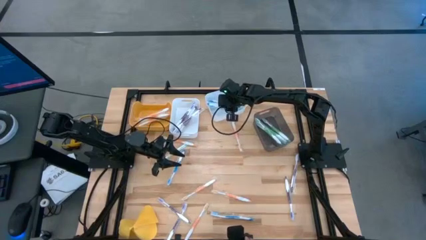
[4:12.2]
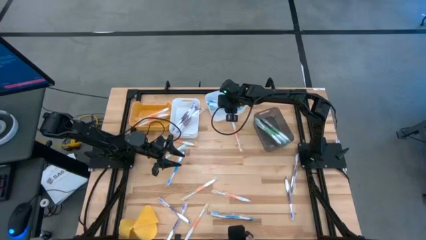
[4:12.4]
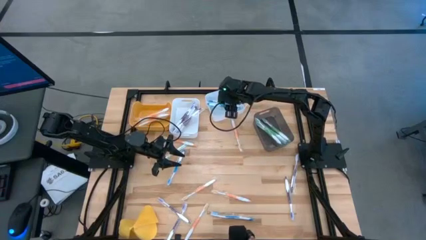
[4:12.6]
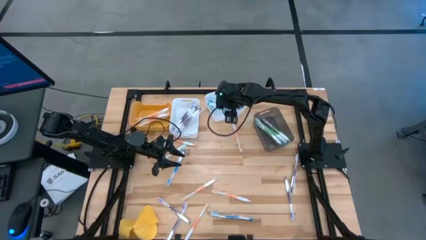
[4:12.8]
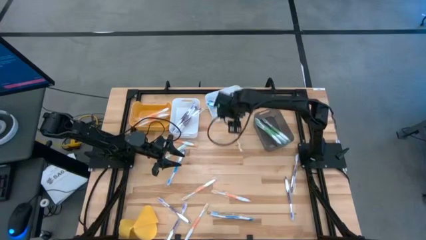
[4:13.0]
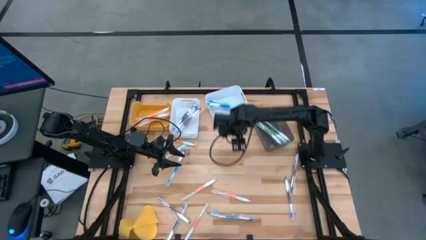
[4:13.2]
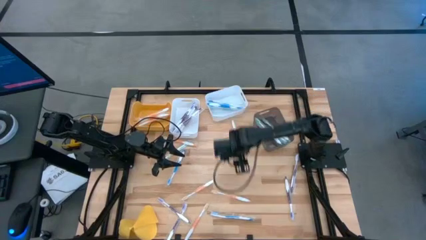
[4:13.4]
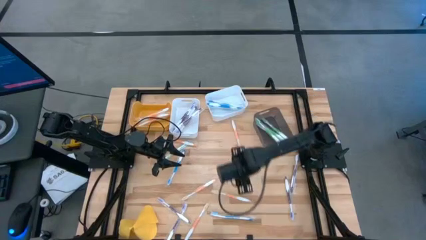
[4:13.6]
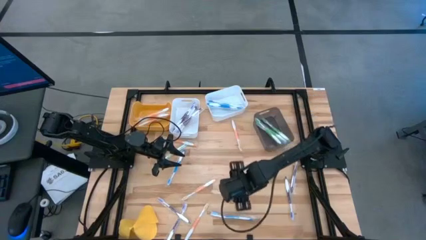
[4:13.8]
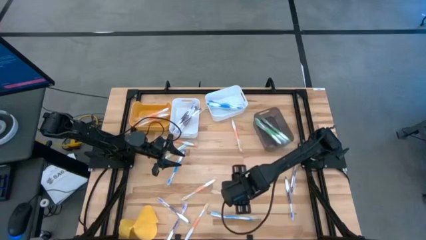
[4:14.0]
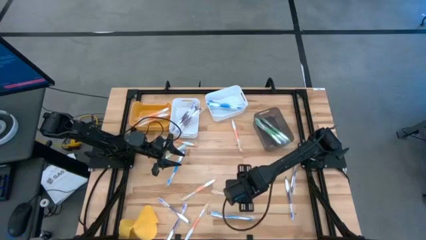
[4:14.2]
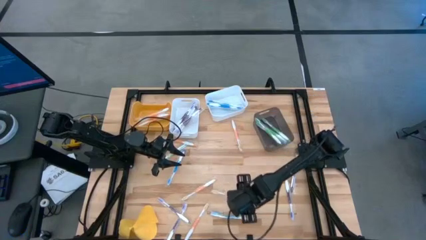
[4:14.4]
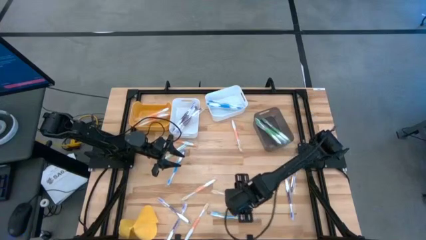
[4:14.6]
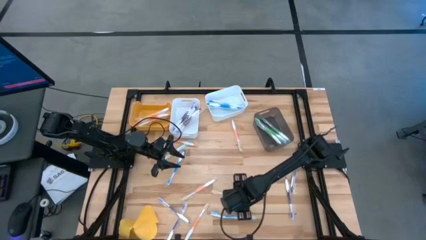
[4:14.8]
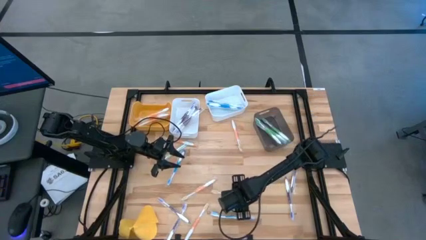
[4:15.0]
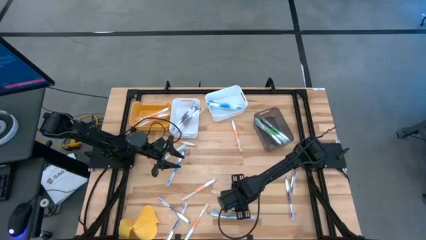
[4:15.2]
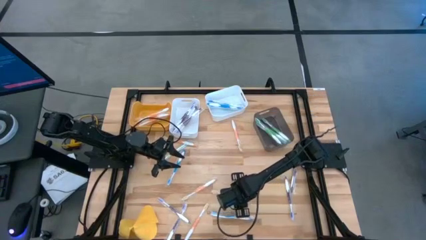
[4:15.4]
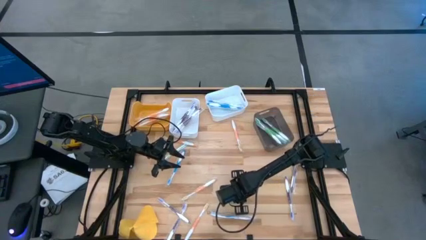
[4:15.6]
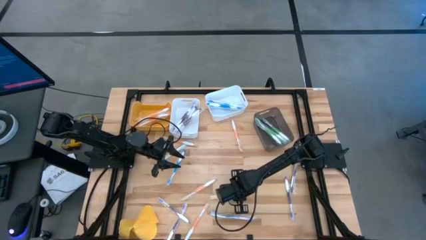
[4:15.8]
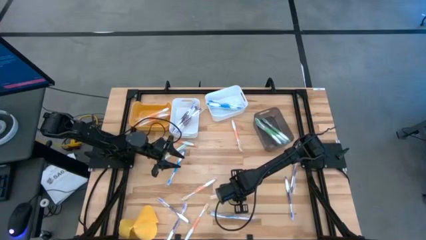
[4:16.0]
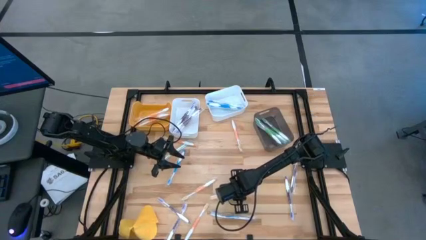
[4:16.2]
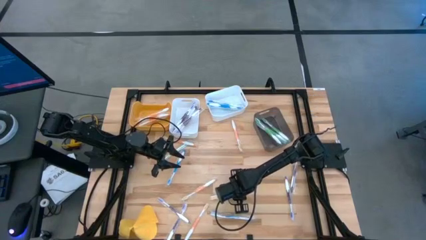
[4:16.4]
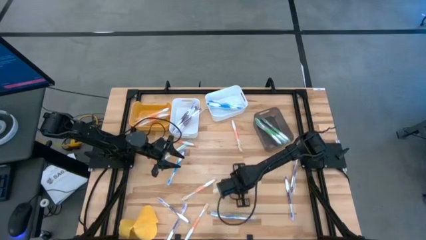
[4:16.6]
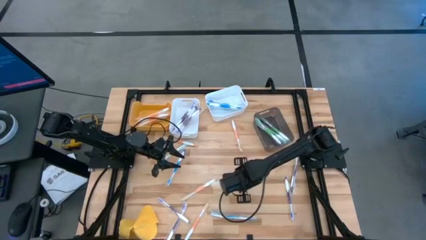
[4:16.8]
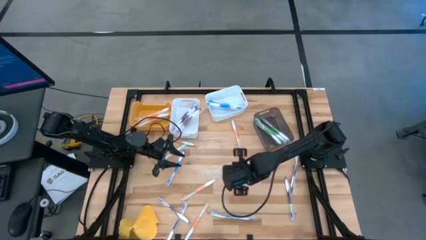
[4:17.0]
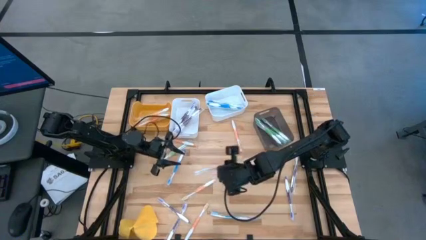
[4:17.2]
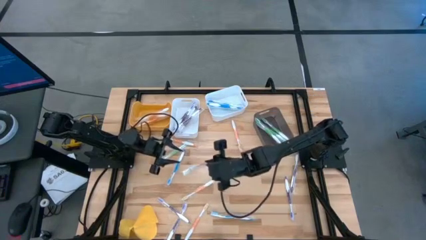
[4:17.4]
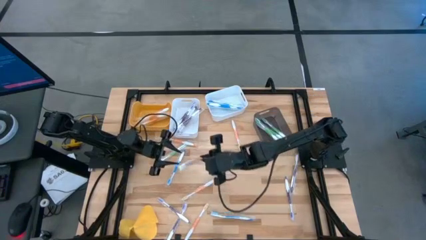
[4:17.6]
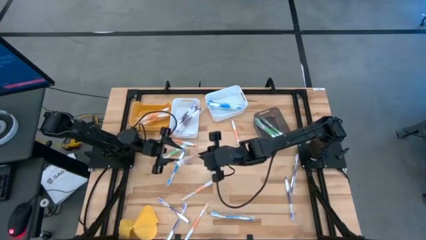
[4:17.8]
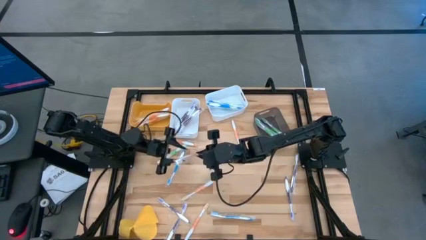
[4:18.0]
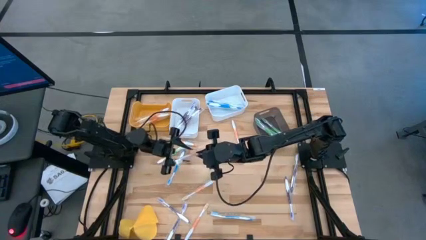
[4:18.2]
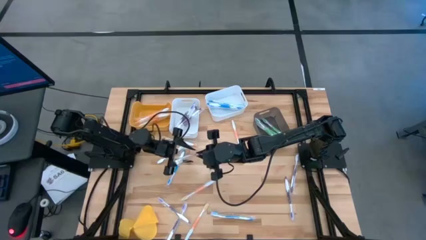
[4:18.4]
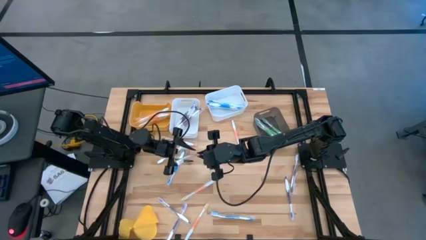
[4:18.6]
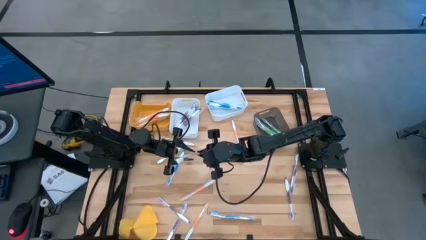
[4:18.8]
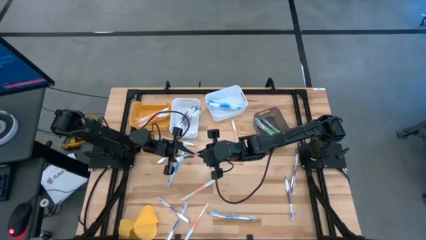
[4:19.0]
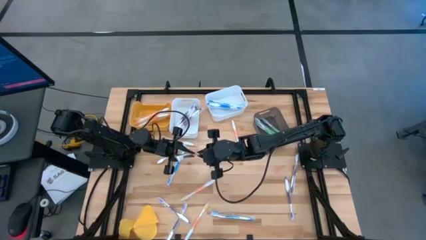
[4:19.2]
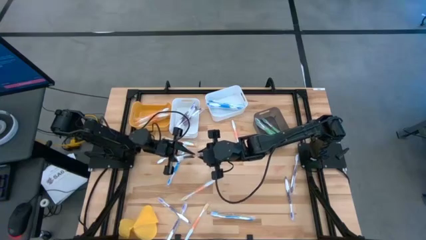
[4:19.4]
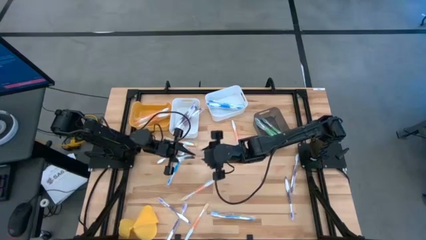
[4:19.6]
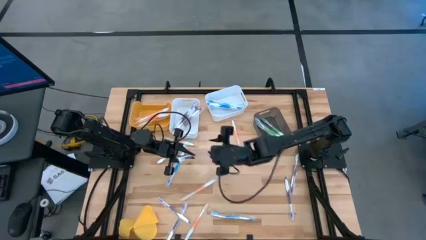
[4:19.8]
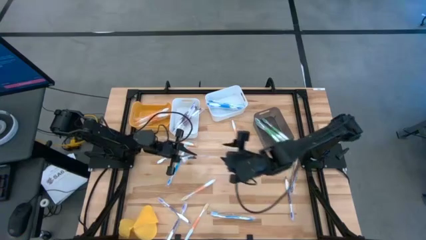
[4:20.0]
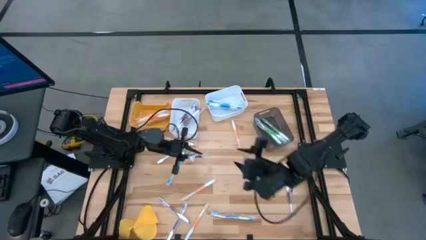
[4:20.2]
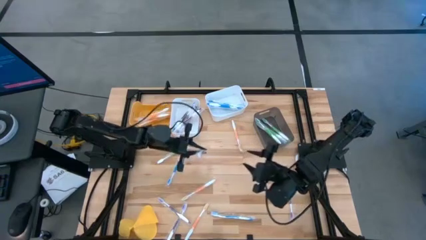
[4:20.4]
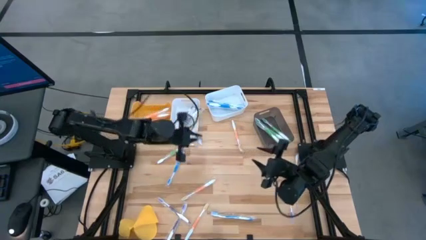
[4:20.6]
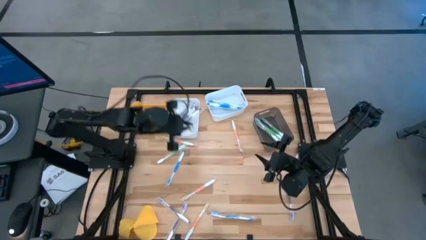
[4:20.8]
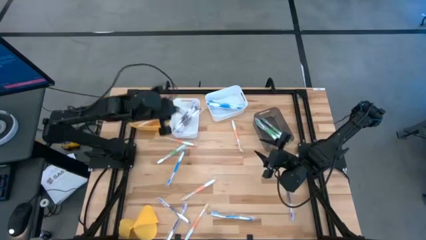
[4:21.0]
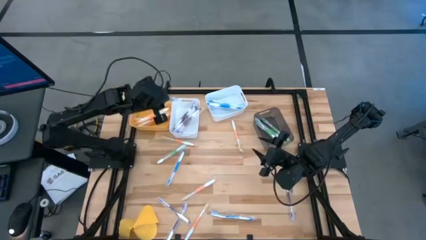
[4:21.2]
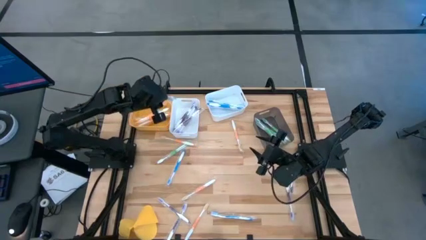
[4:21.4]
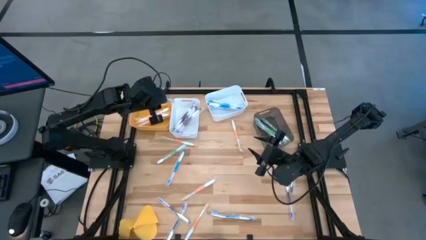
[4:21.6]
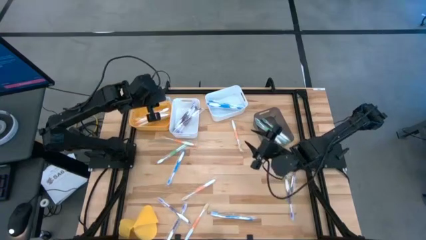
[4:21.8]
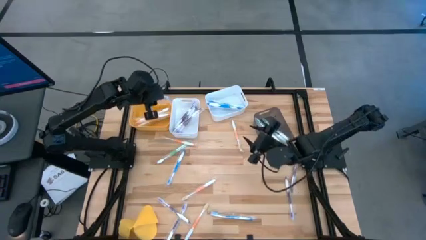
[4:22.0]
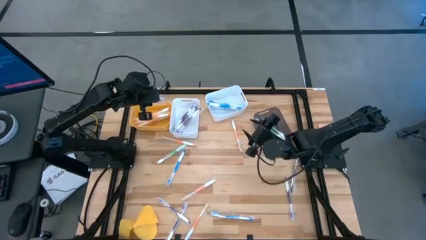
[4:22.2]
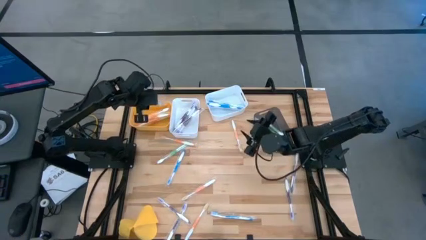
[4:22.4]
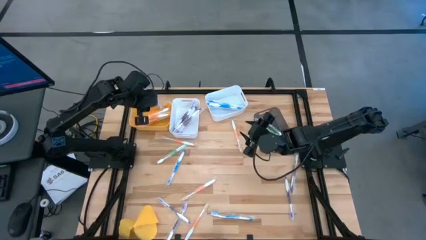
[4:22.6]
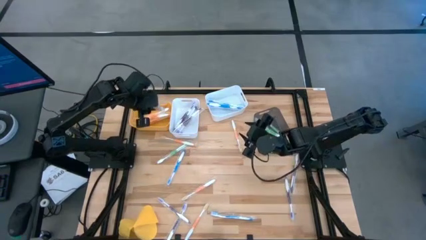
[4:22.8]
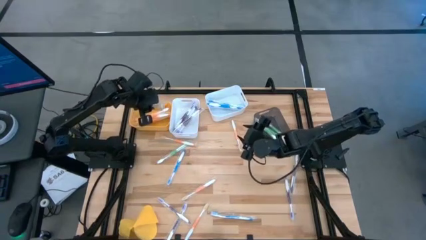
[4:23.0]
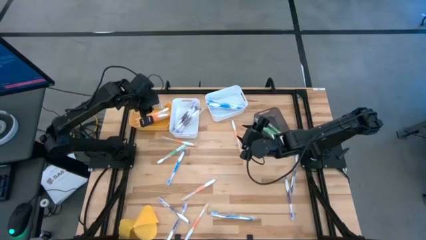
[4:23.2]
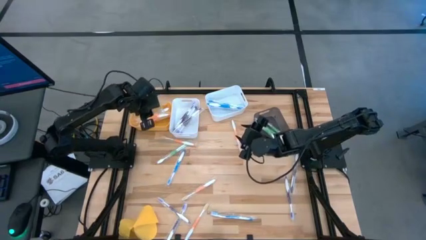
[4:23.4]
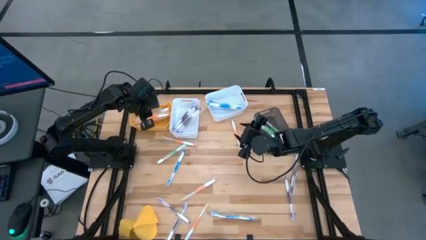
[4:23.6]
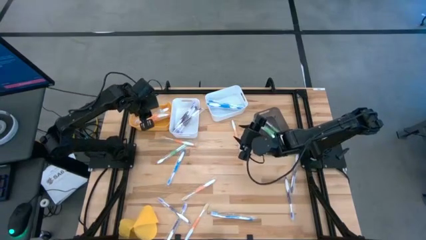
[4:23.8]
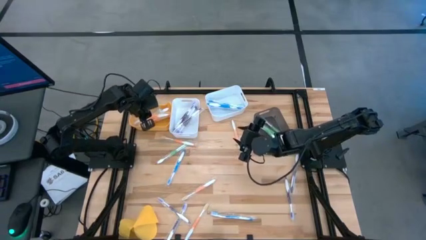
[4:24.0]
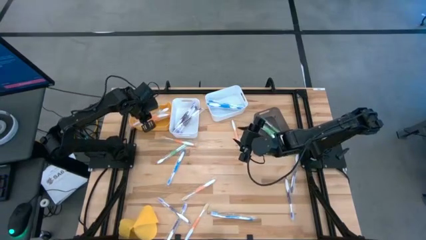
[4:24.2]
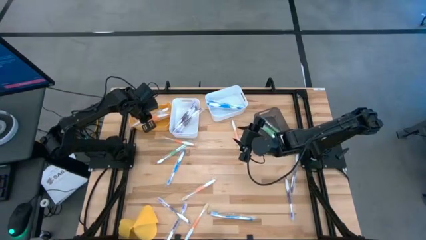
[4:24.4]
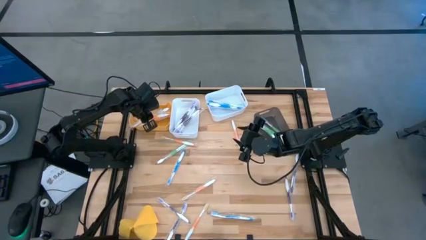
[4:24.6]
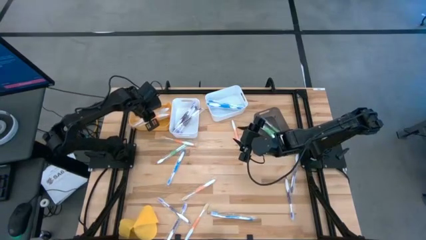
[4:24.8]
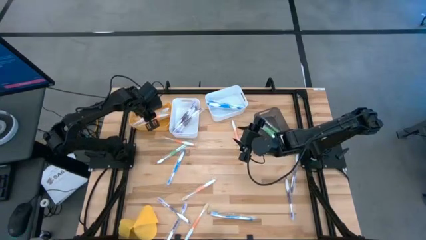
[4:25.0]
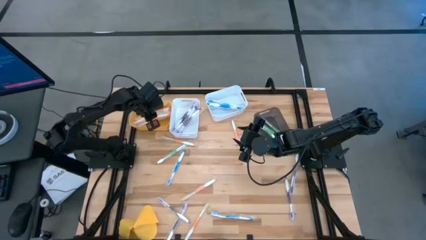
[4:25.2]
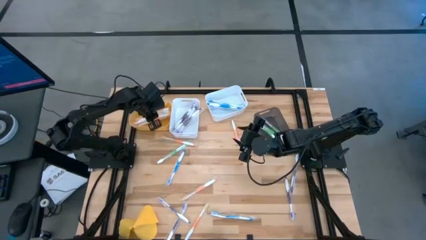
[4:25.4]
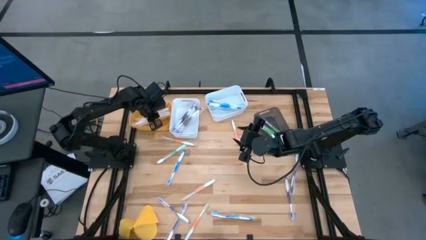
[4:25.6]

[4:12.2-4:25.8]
Task: Pick & Place Toothbrushes
Put the orange toothbrush into the yellow bin
